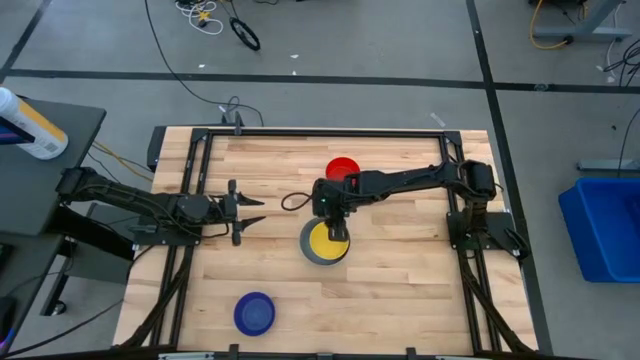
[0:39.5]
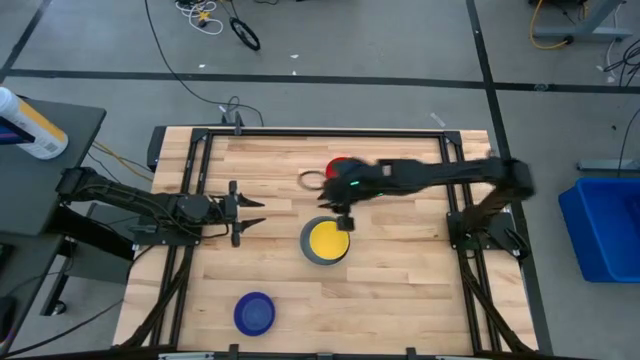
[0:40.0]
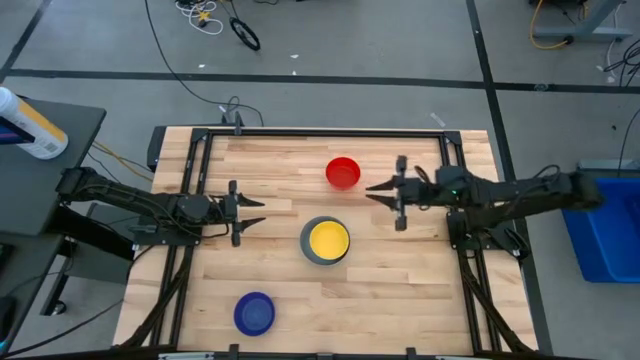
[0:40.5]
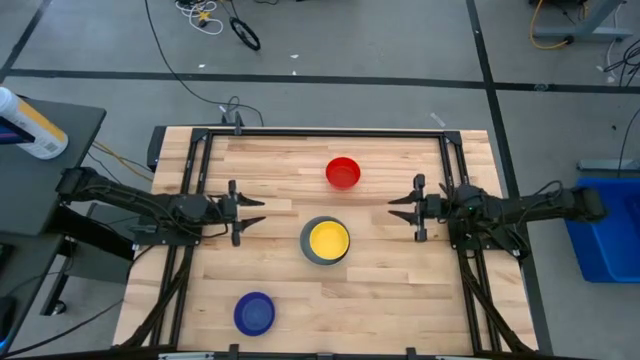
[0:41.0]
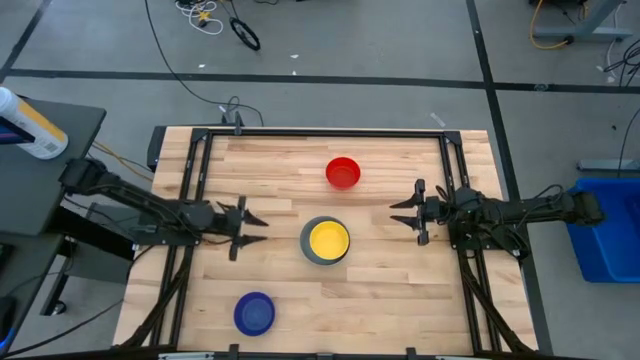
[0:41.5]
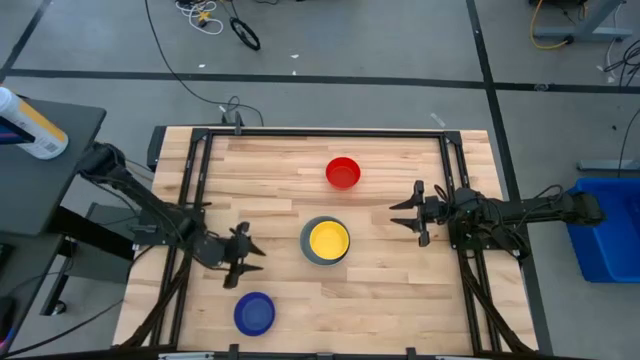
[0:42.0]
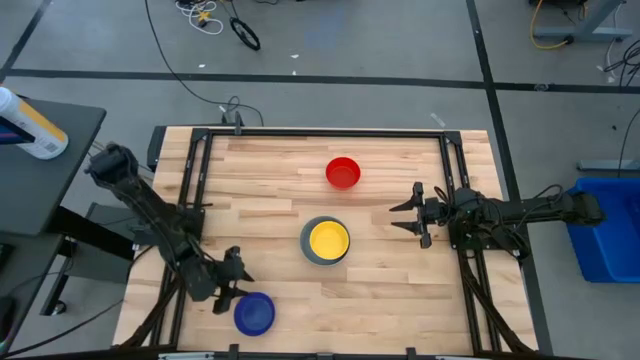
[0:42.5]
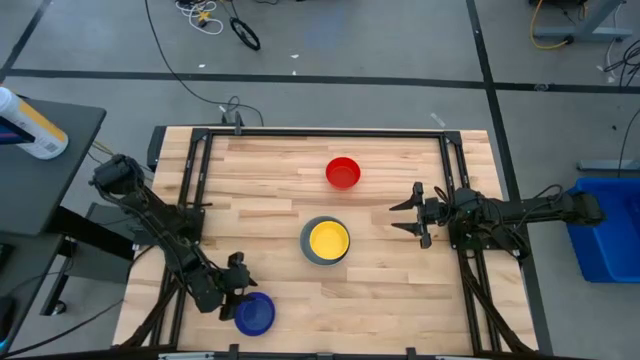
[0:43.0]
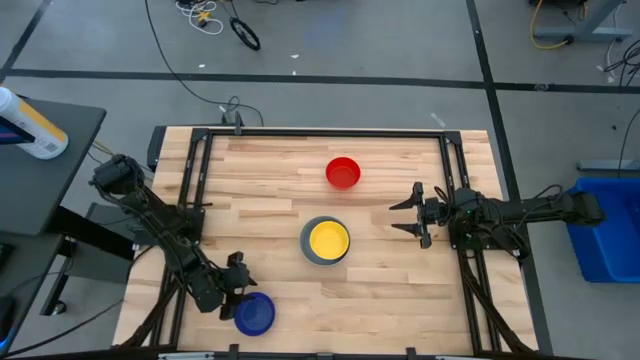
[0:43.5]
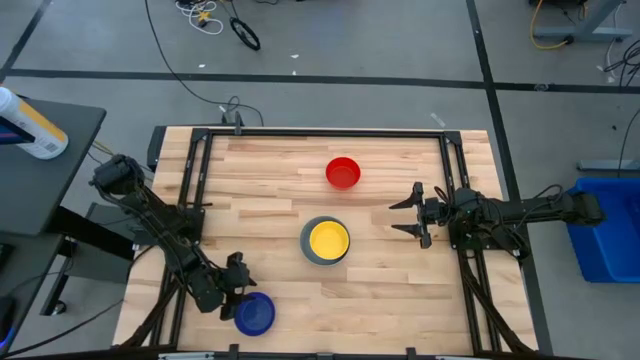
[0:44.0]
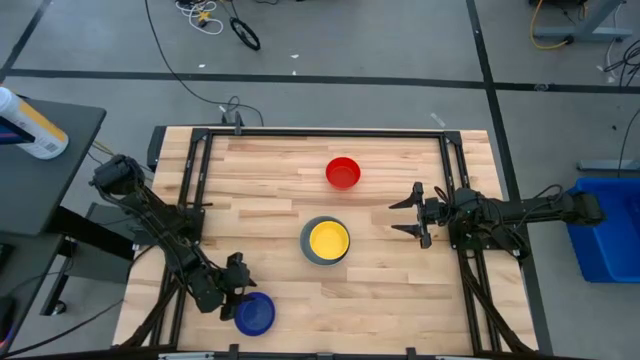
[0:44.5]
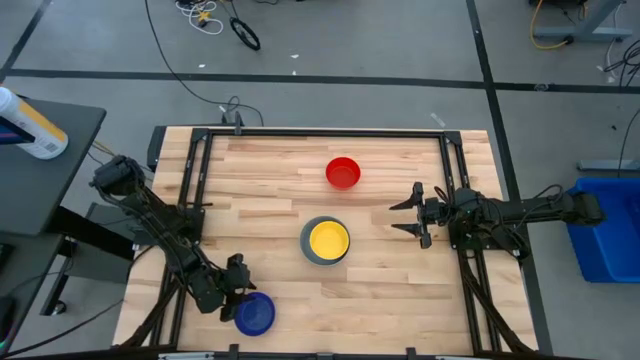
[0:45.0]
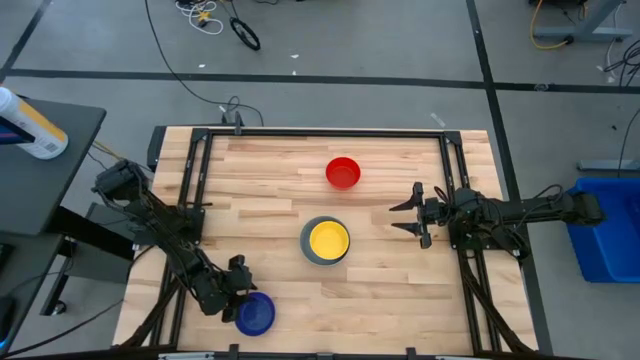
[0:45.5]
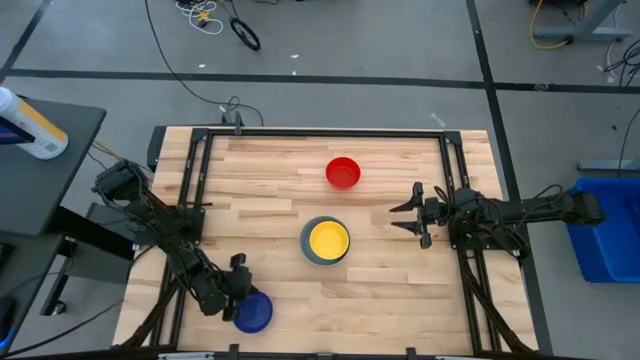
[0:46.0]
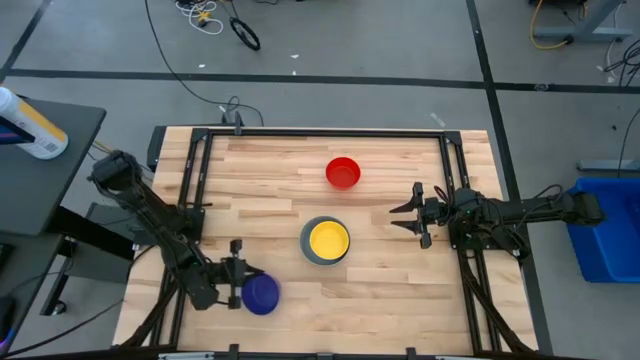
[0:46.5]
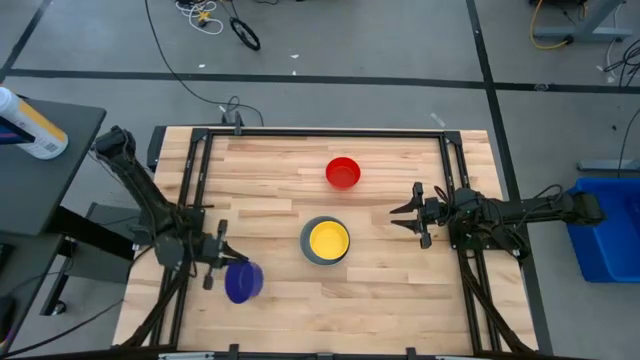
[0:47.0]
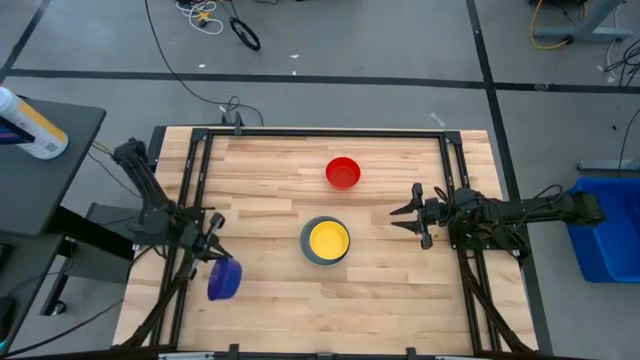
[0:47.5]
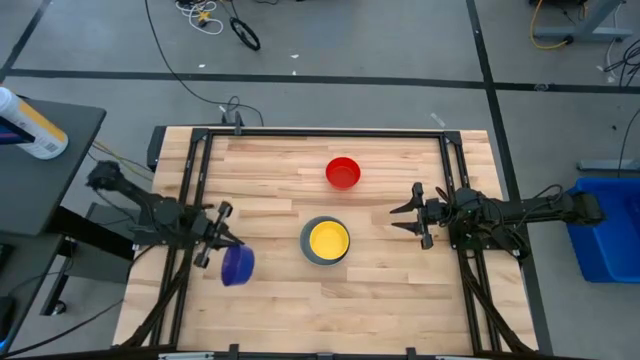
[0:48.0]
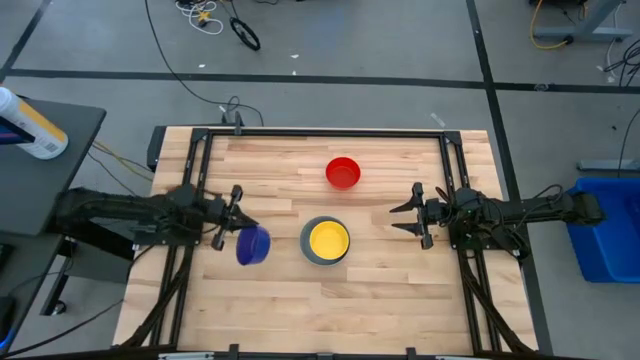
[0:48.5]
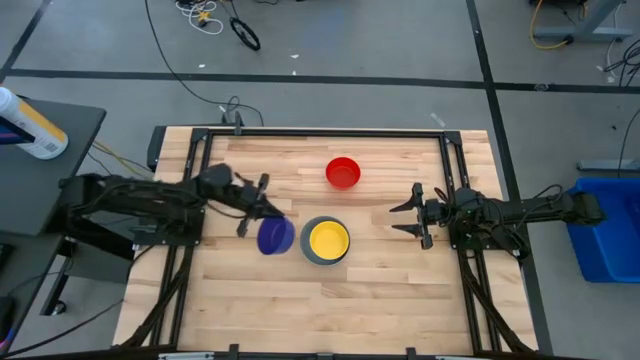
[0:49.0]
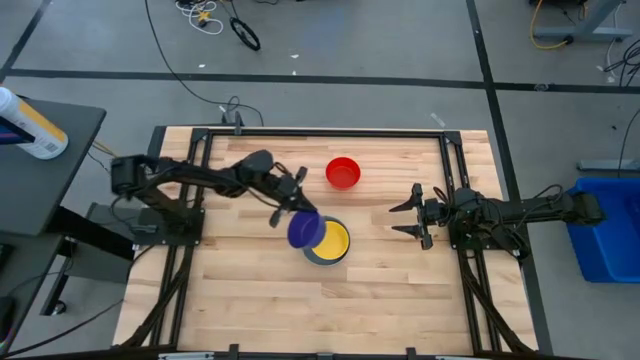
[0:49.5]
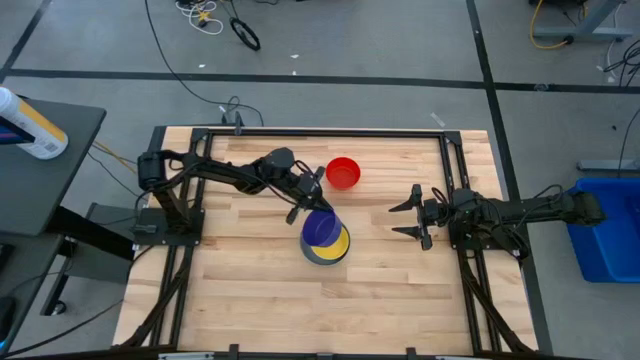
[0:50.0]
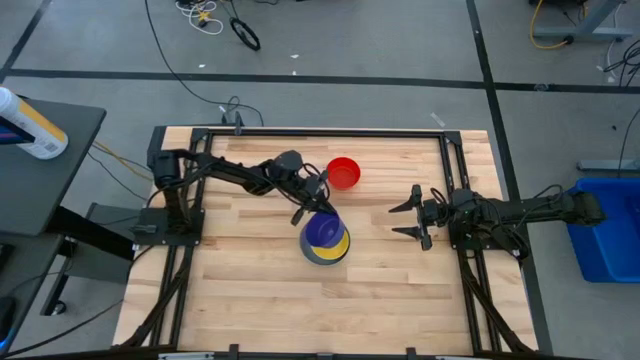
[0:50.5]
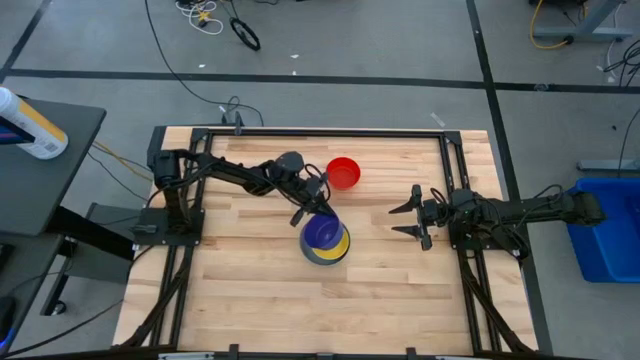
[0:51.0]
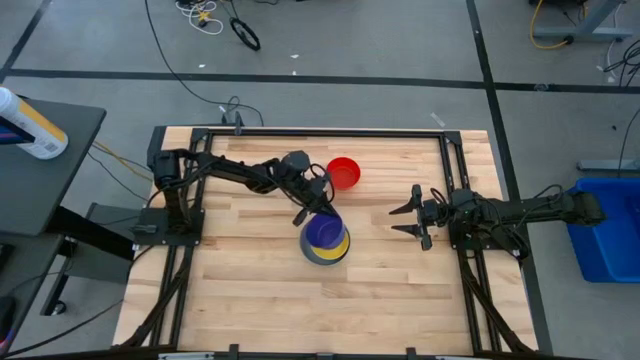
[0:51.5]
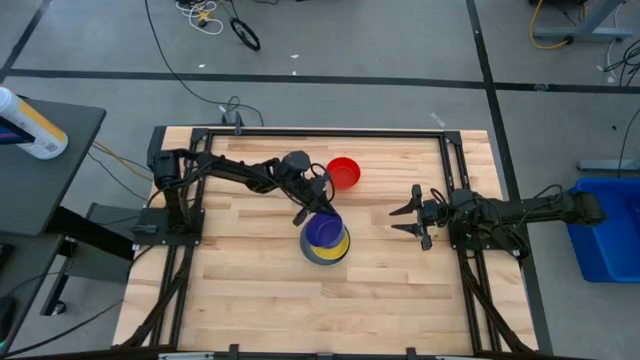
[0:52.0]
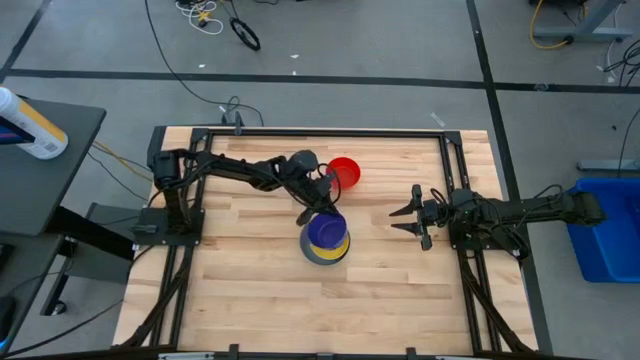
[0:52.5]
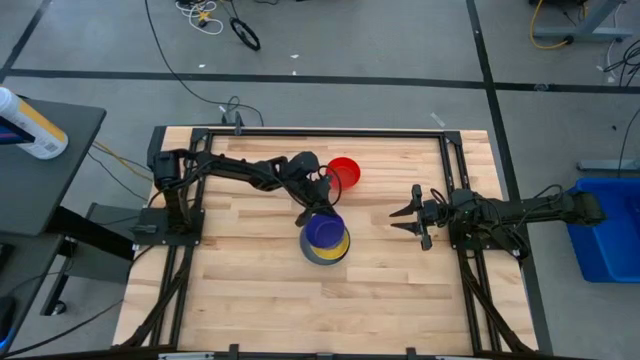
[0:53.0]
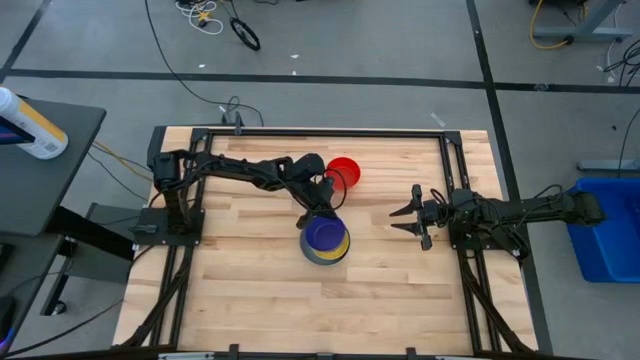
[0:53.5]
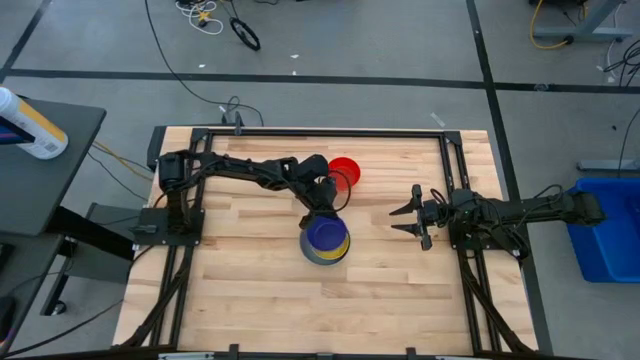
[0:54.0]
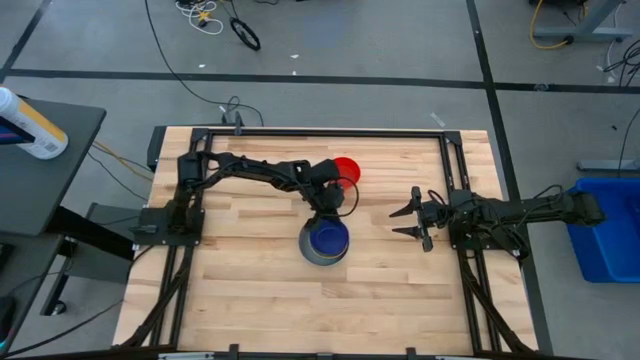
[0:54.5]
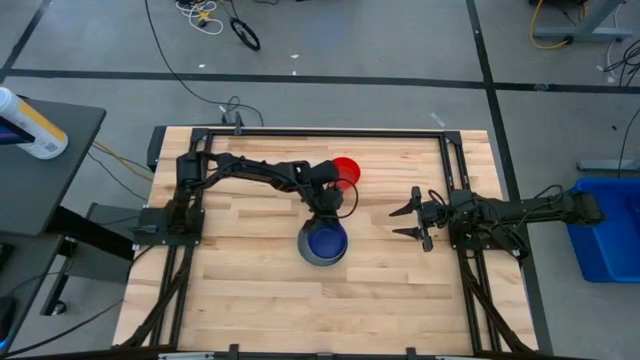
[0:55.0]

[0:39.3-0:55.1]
Stack the dark blue bowl on the yellow bowl
